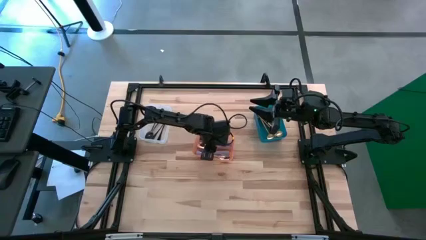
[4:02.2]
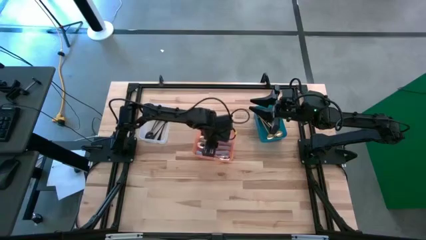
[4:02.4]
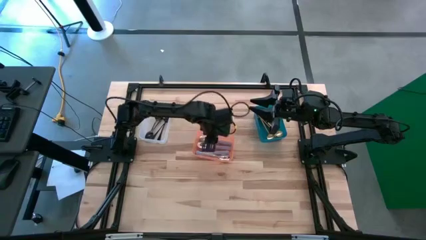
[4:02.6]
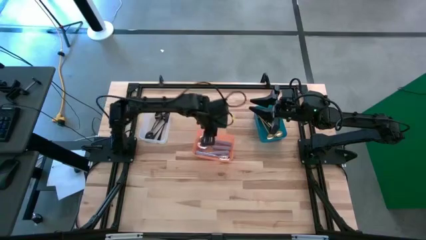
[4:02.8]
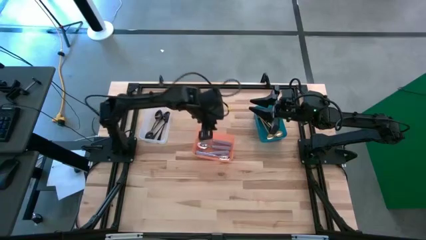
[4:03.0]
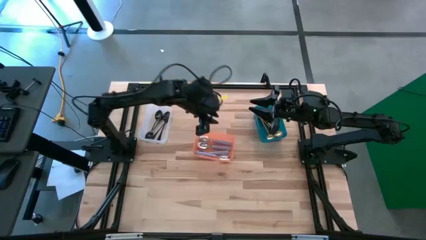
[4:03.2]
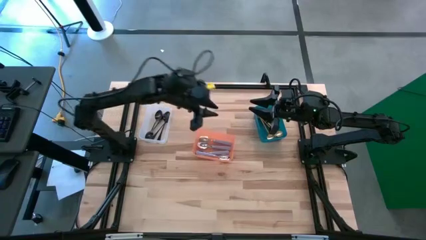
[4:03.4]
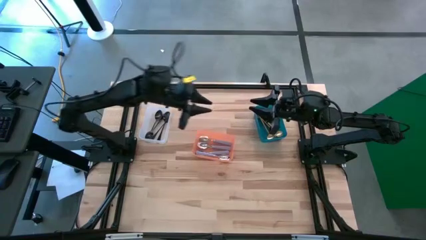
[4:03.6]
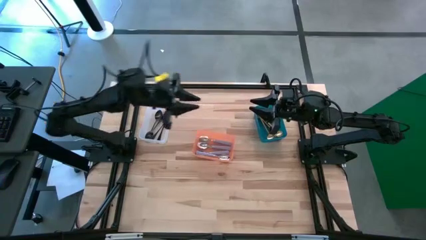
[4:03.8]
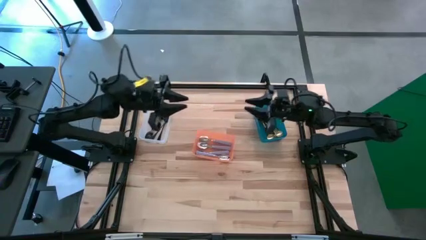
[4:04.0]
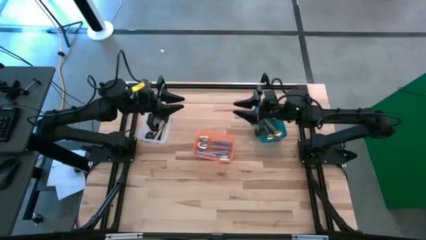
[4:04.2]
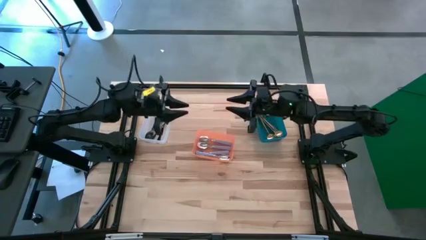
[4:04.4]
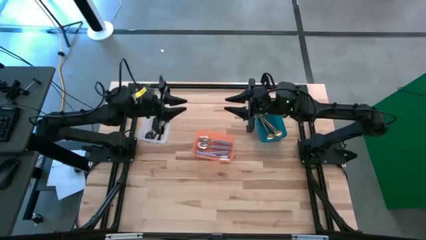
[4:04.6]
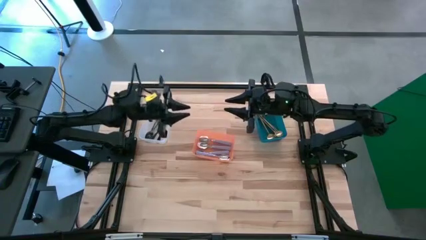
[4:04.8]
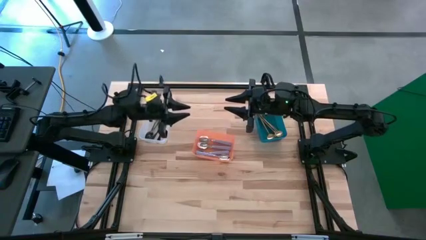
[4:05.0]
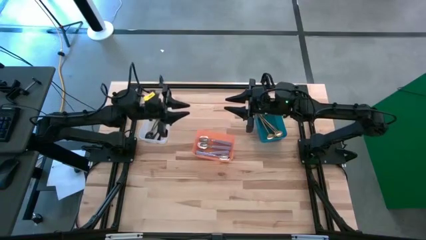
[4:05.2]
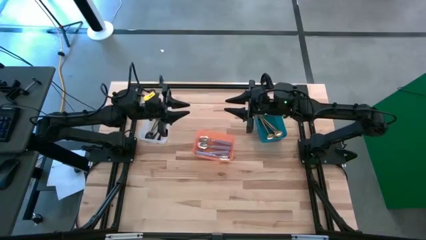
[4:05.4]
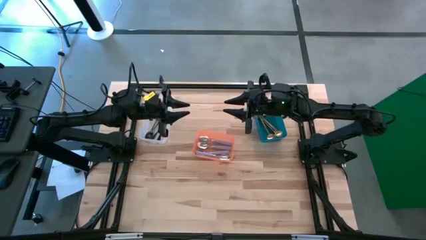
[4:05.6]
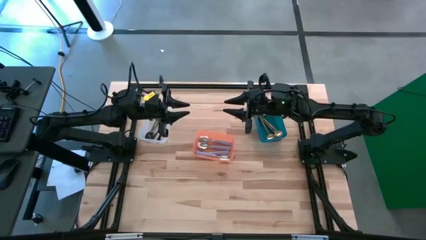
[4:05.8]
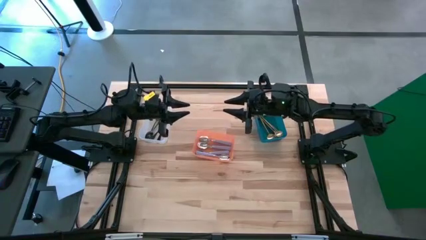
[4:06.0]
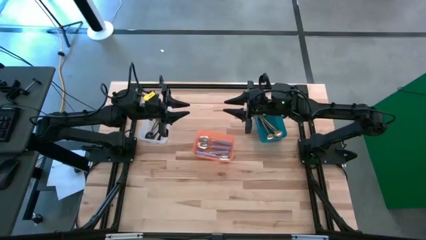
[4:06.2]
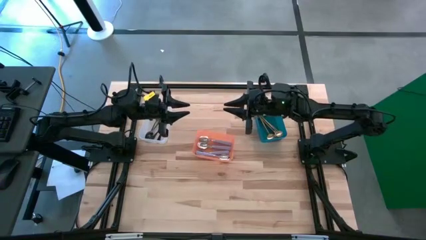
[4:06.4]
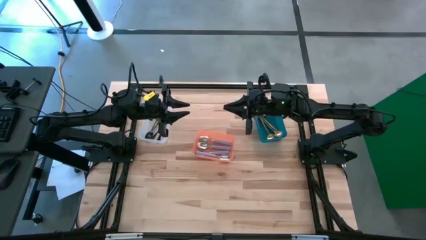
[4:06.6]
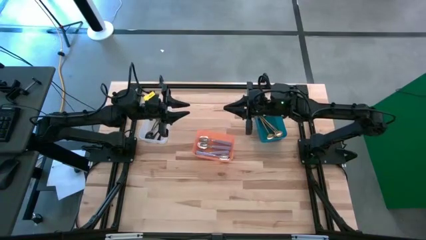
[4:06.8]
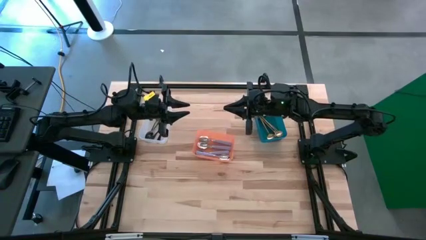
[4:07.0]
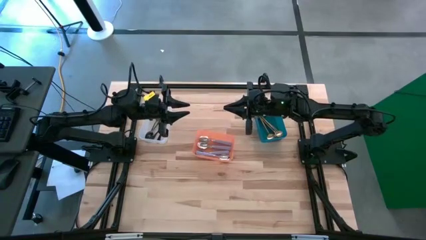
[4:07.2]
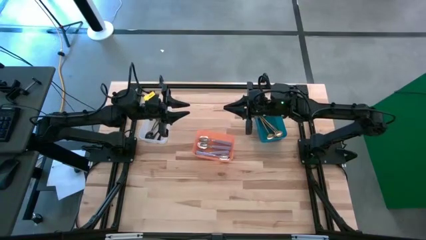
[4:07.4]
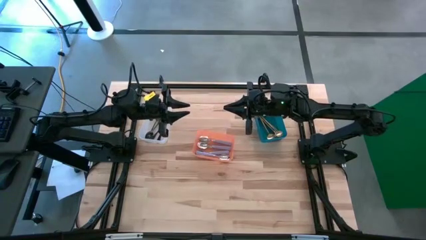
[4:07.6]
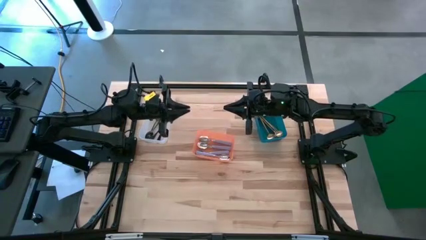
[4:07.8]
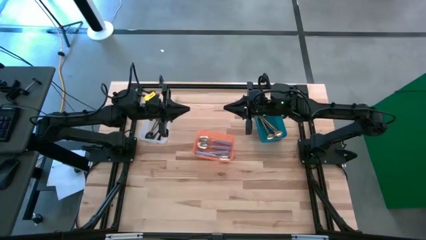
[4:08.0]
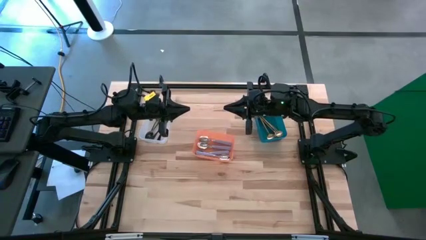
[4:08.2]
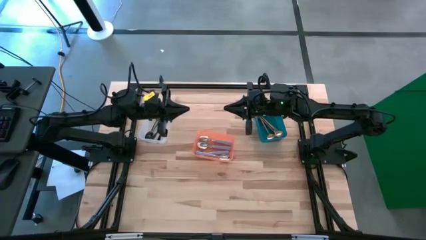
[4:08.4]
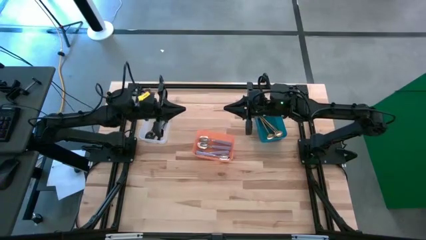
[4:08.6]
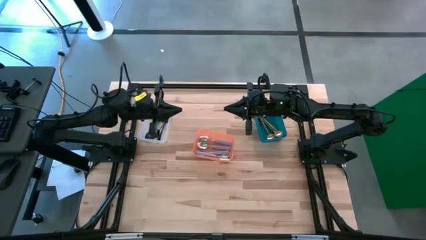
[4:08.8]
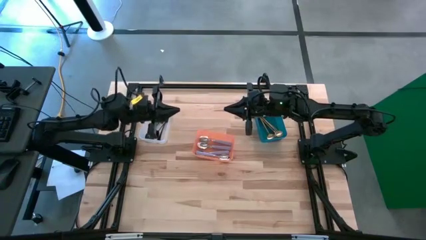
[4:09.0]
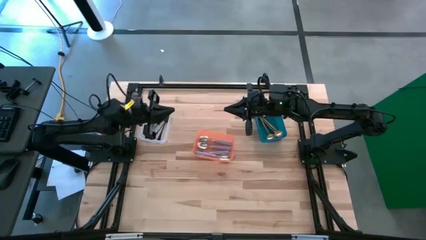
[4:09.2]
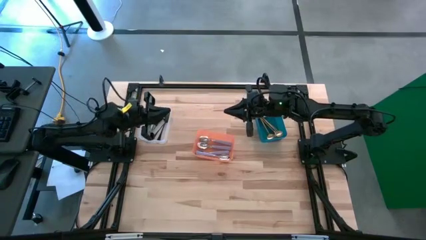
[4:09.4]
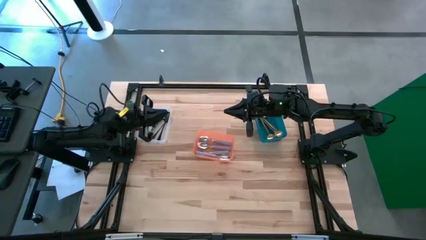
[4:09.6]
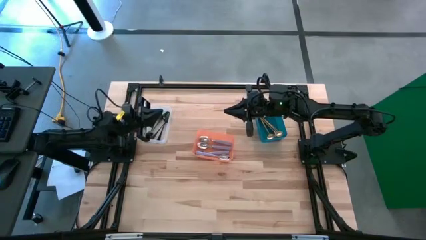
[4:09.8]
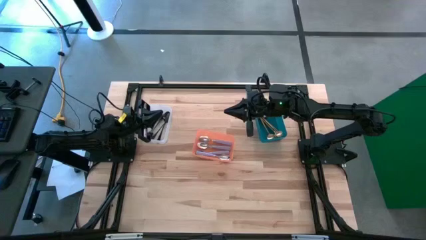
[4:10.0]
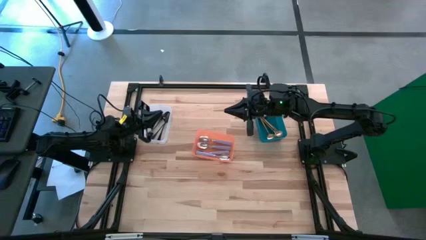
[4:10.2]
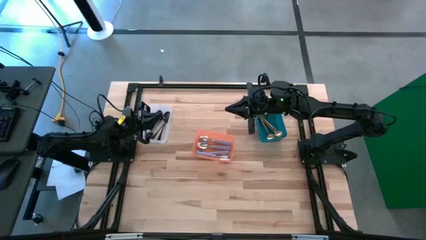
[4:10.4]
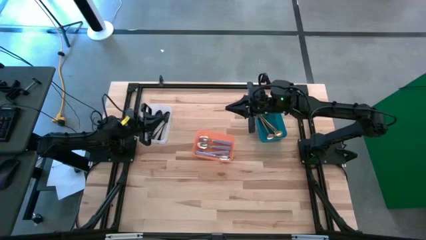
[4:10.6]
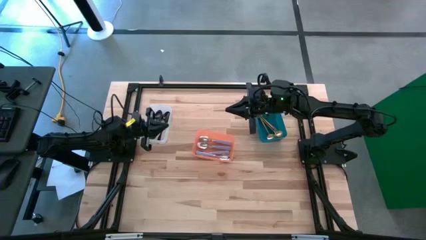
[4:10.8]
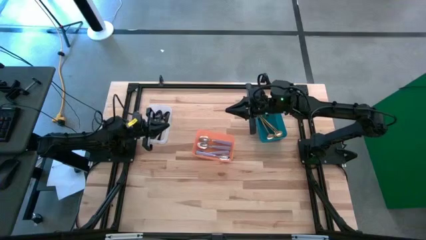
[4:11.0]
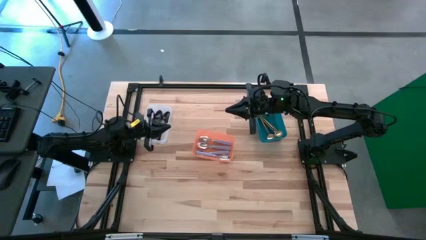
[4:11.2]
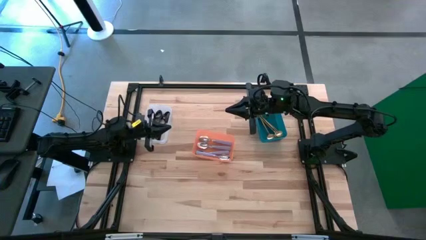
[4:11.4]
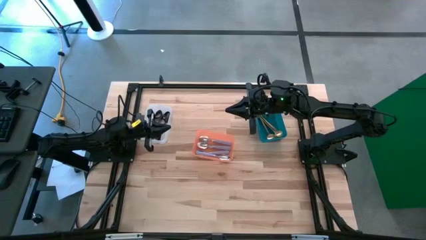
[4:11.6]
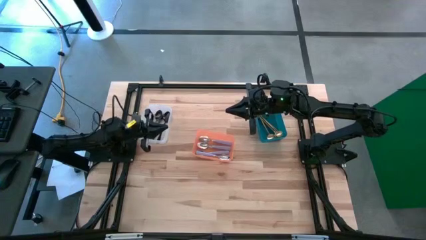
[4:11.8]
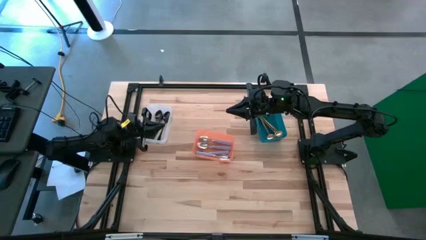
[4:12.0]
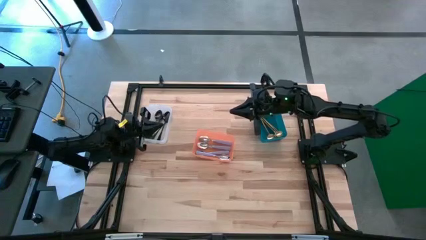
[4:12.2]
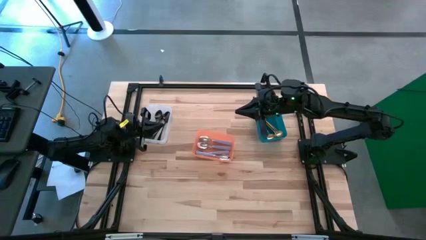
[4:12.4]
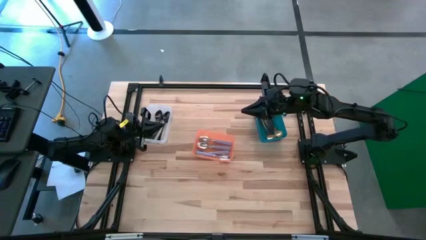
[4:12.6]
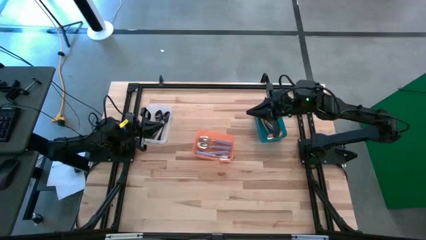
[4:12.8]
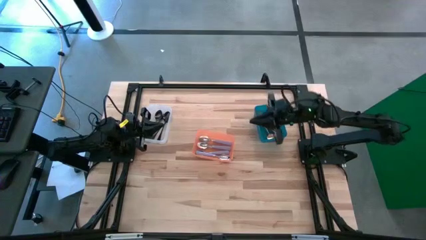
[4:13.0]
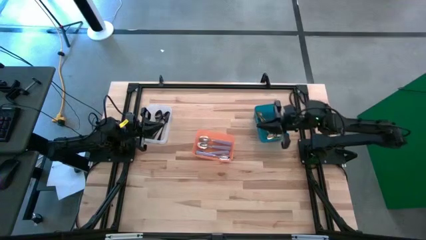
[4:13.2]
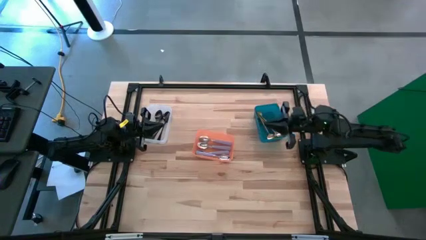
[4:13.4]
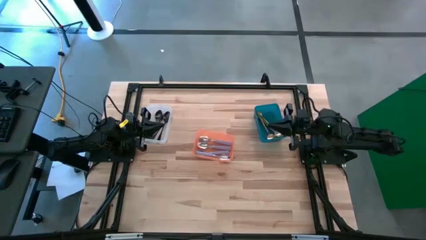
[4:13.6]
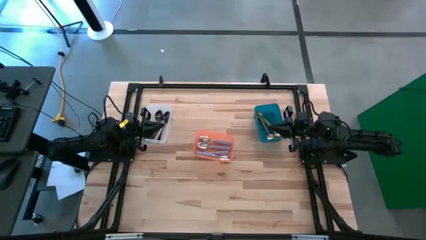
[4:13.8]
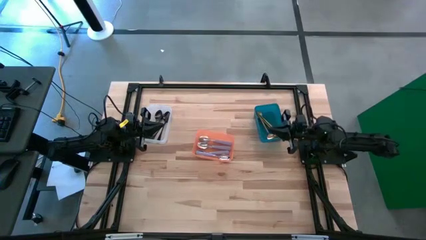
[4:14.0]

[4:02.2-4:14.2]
Task: Sort silverware by color (type)
Return to Home Position

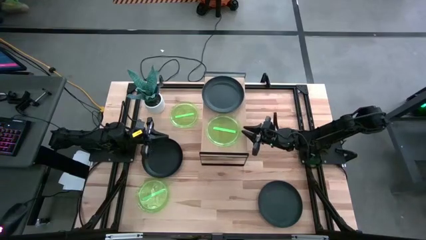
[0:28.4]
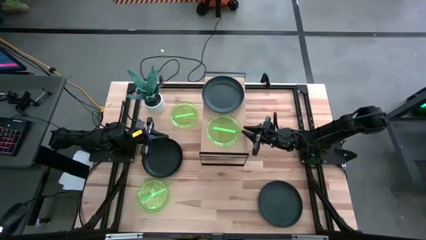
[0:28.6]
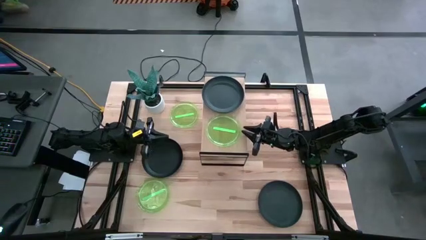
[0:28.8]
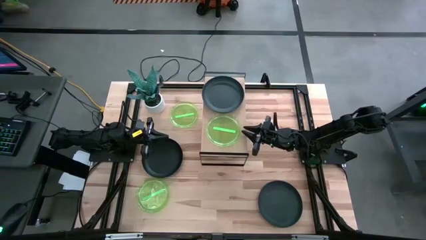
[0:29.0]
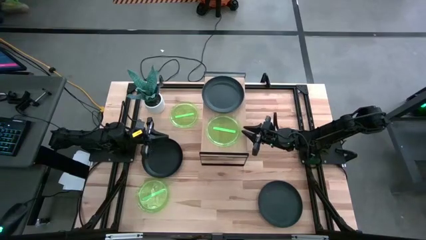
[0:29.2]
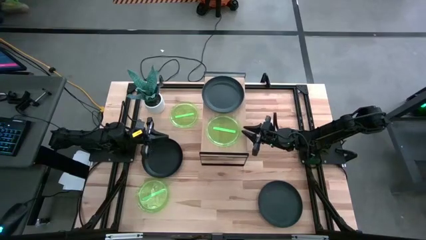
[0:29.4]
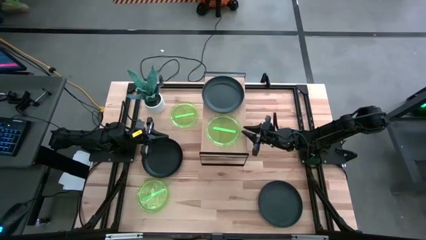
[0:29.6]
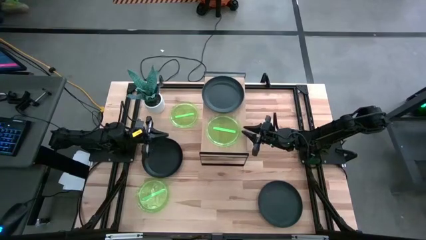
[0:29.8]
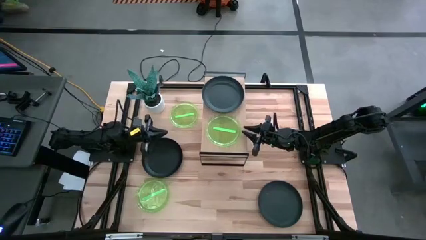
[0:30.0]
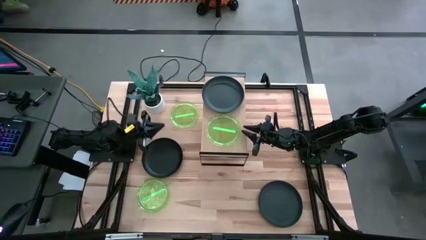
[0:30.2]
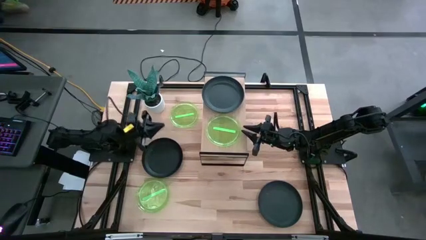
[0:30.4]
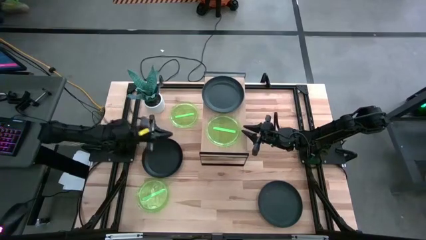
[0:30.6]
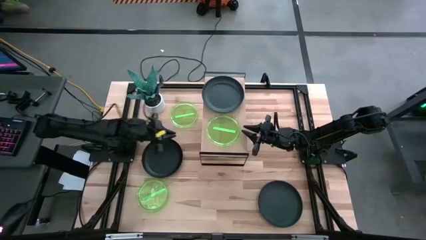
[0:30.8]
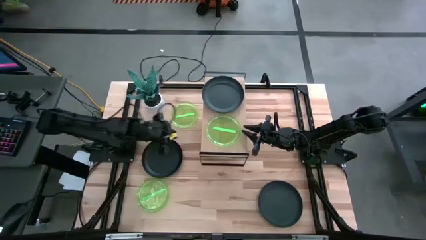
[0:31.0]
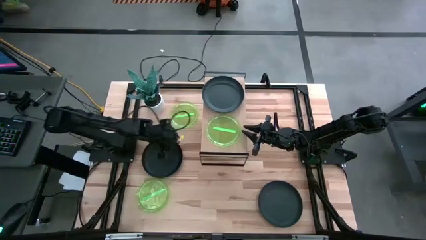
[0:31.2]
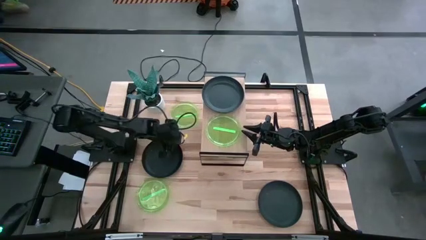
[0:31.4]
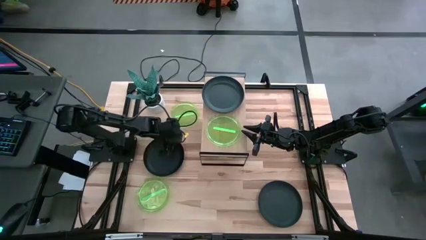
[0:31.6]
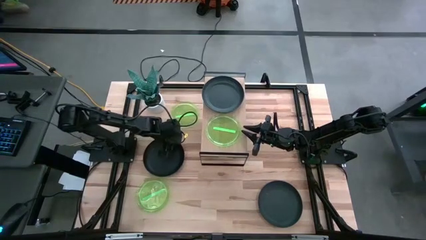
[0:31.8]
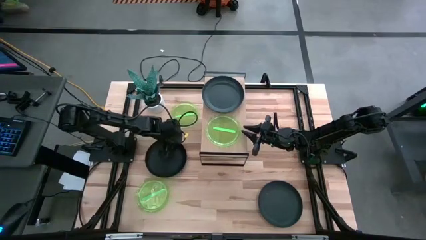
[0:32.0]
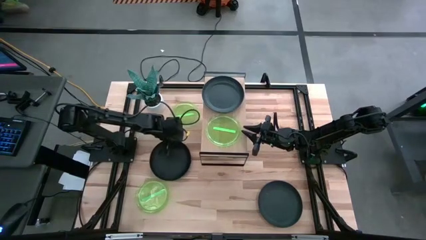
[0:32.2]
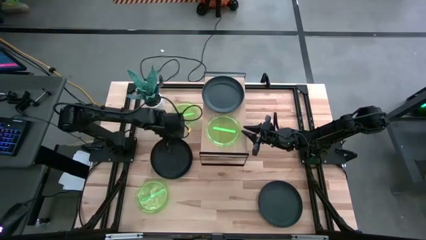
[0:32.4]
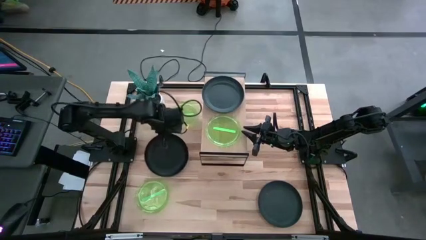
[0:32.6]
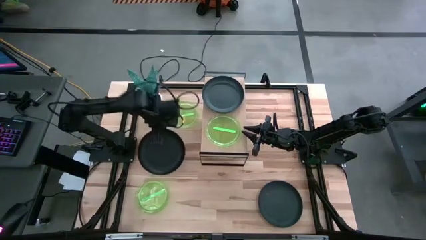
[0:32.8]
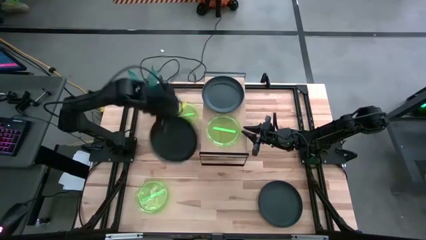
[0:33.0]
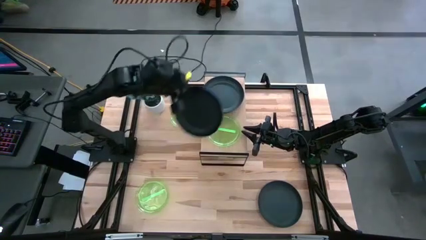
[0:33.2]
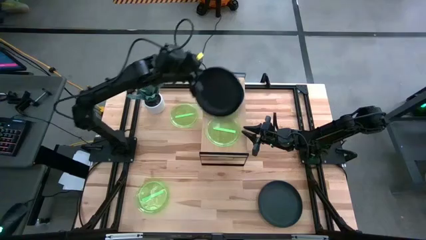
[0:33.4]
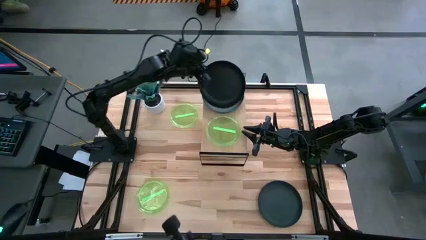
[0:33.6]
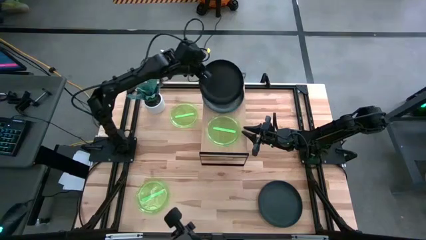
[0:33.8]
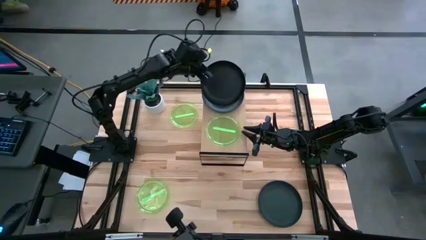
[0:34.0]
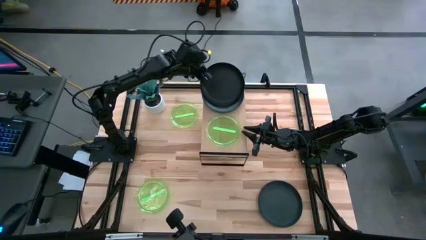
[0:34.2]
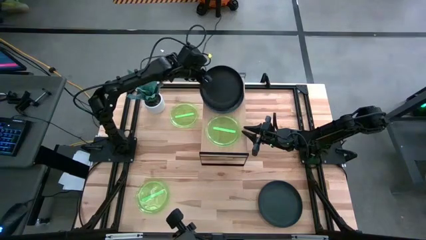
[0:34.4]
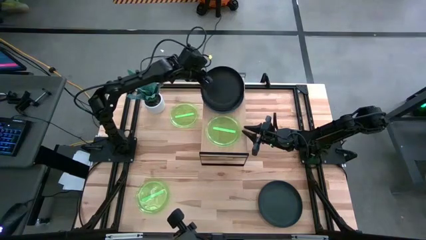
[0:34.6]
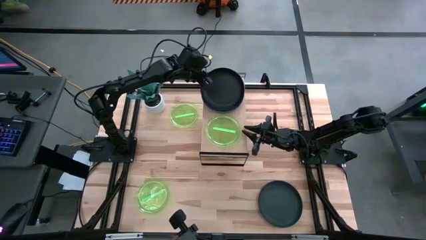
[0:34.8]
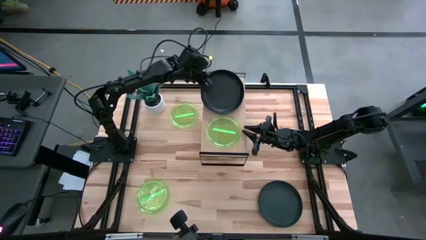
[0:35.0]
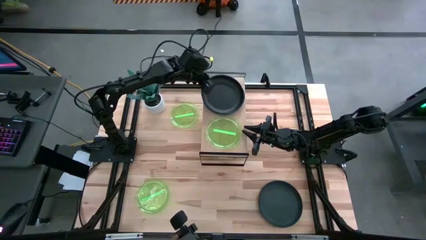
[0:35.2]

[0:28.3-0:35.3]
Task: Place and stack plates onto a shelf
Stack the left black plate on top of the black plate on the shelf
